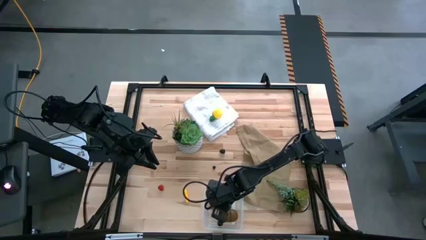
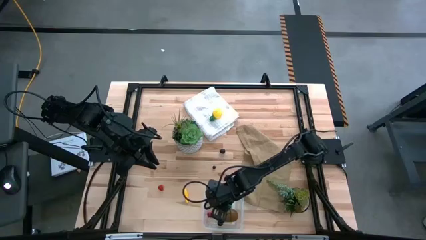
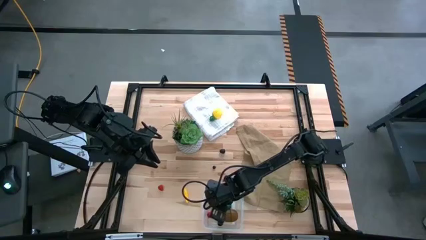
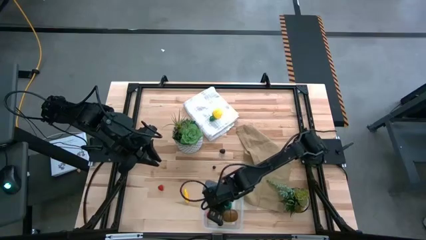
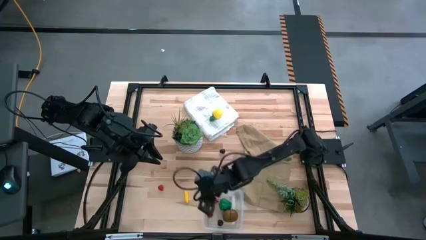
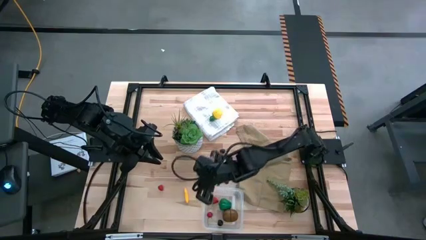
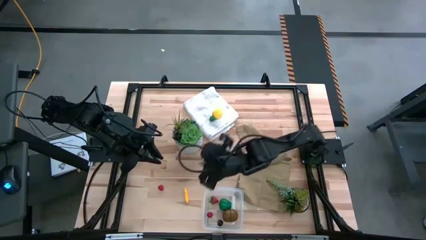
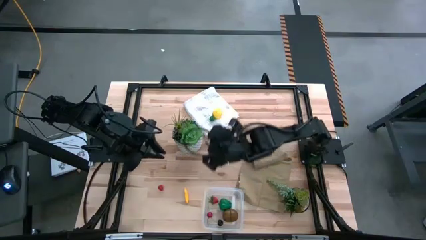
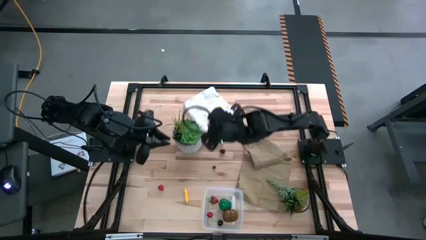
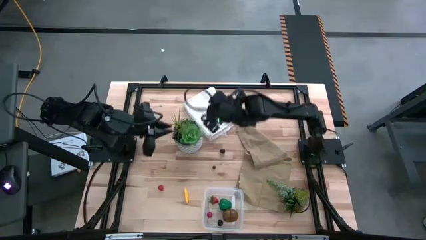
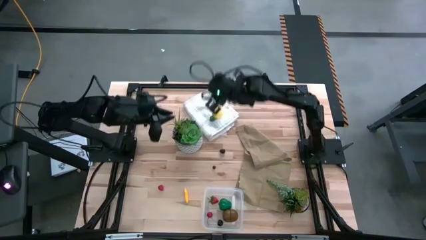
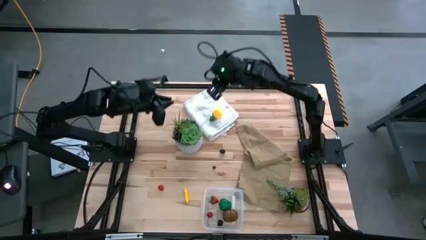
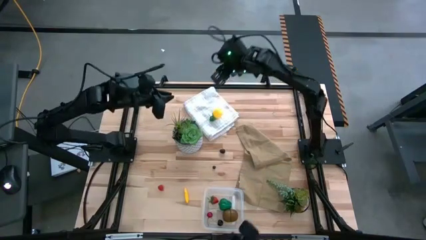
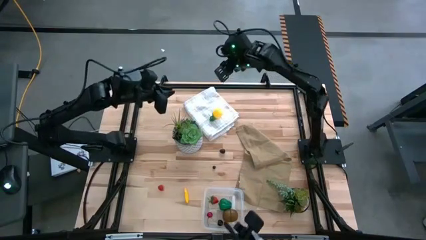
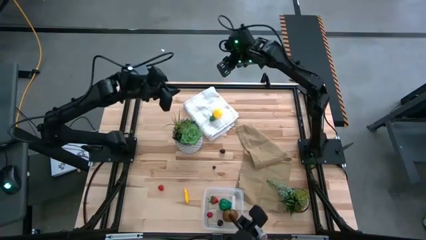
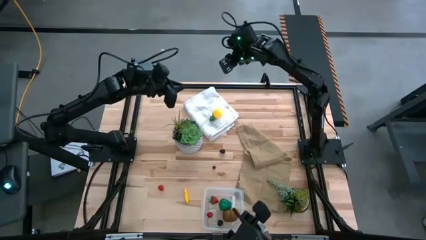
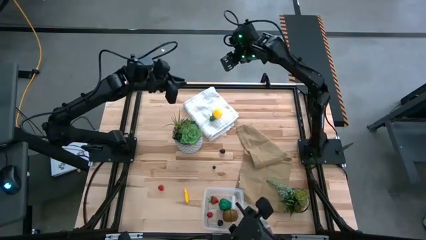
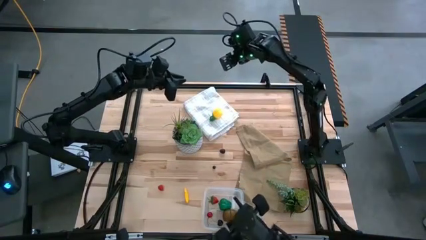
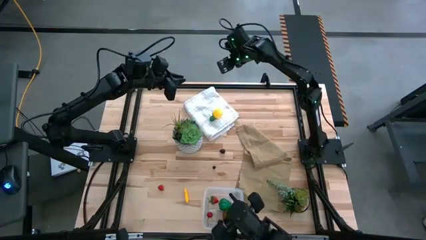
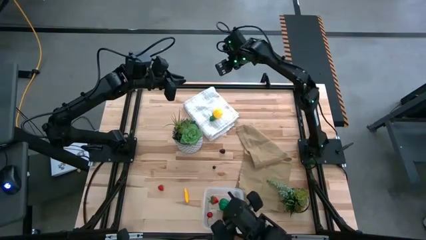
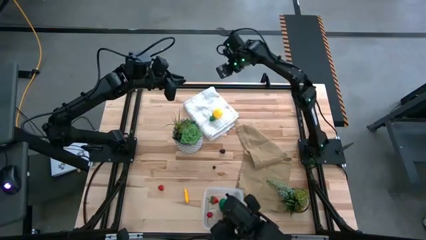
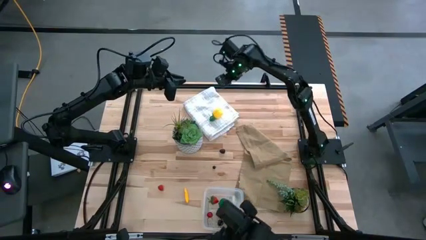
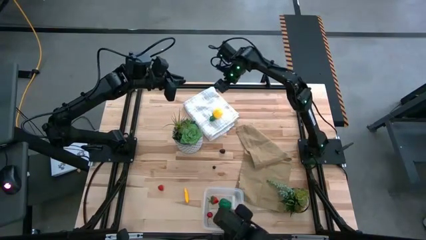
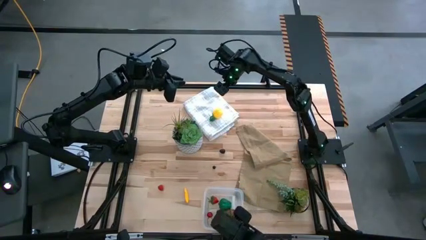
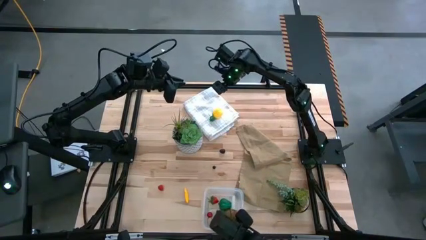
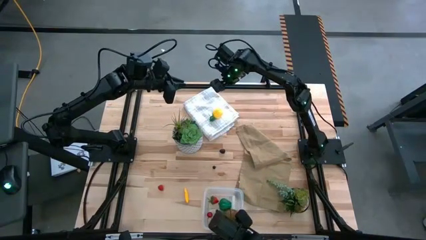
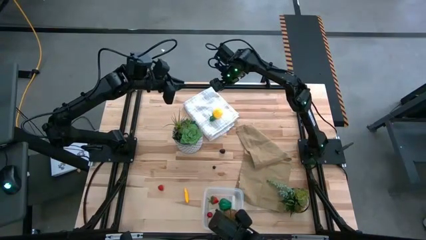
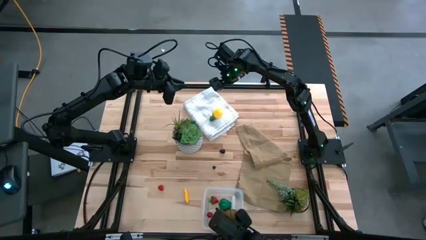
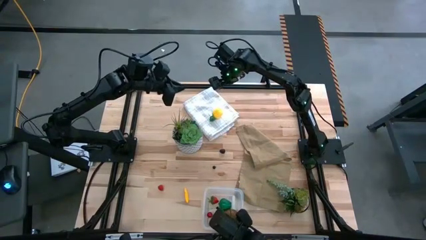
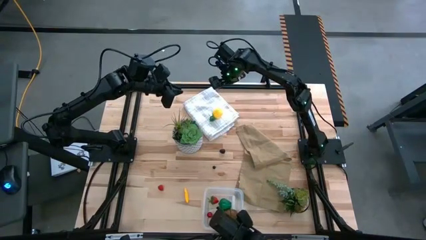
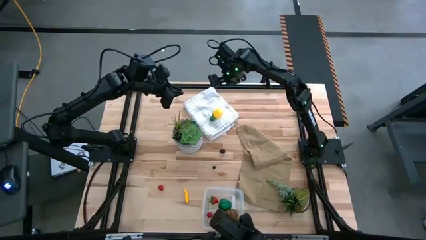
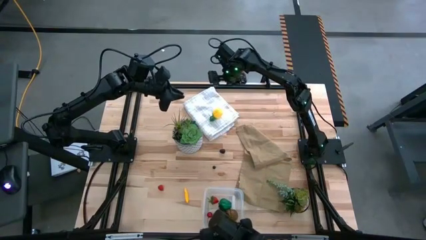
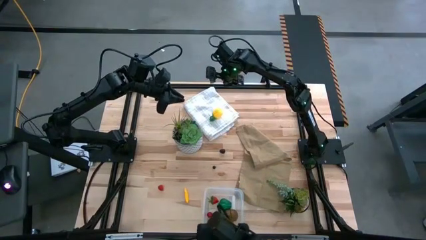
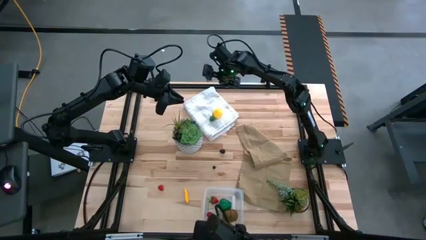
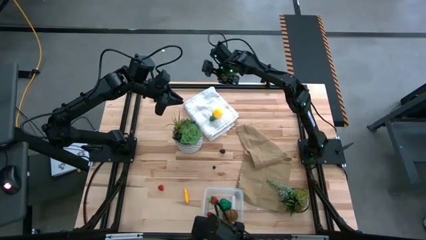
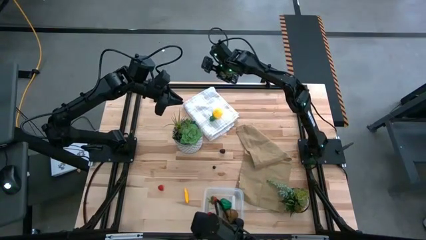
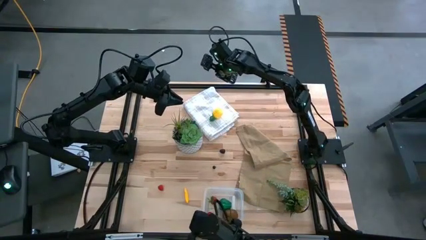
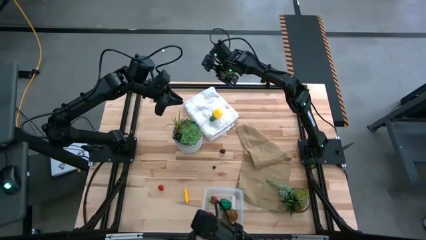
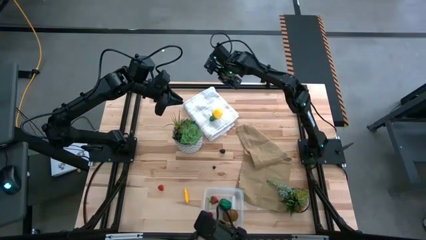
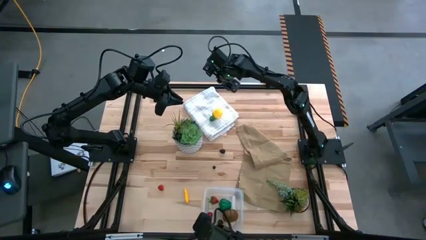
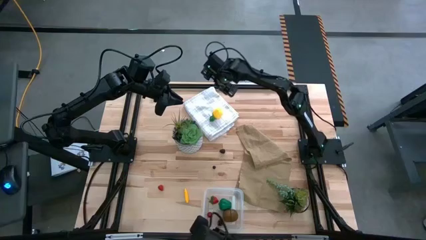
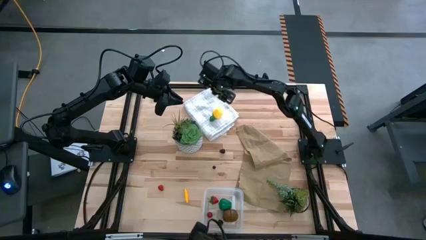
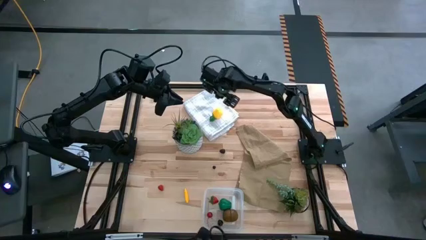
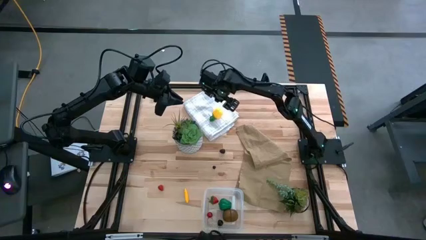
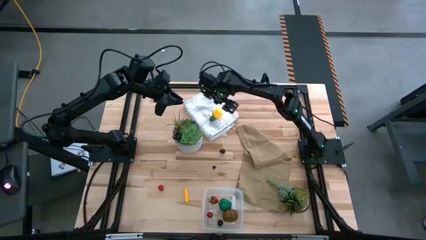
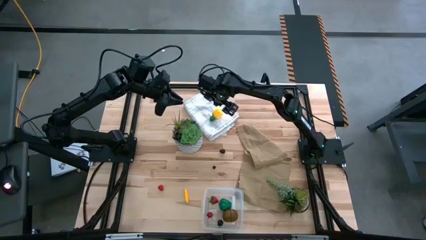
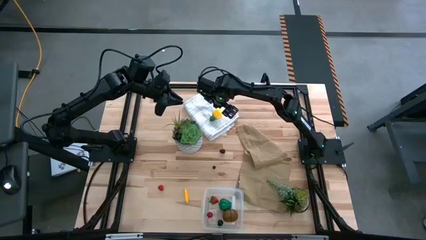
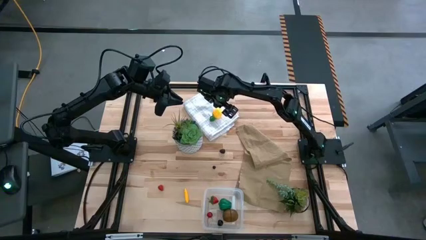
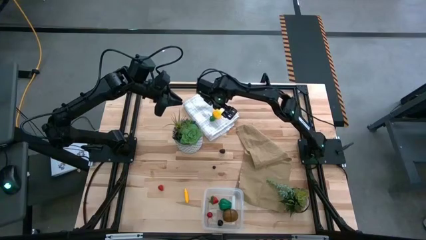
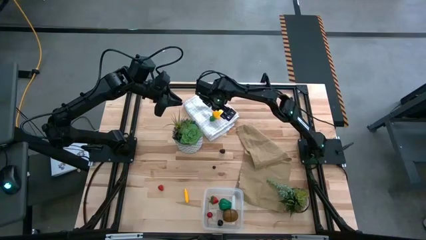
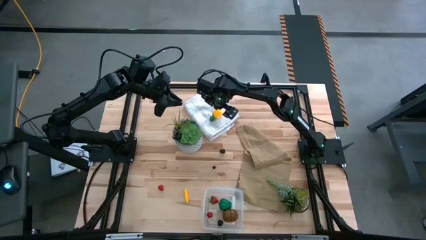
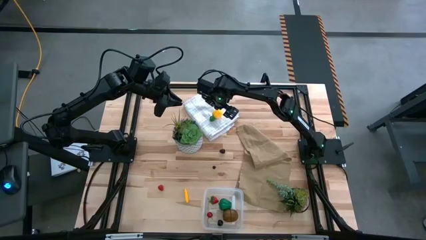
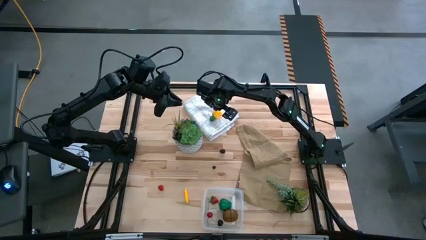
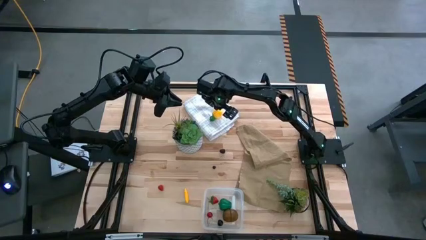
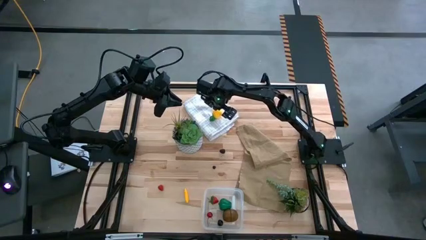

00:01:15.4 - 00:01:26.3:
Task: Pick and placing Produce into tupperware
Put the yellow pineapple into the transparent bin

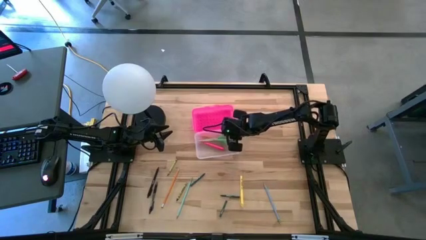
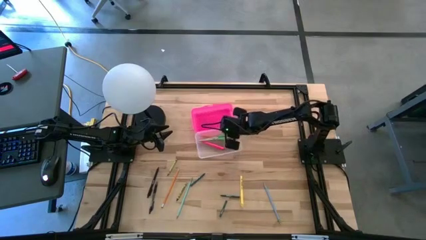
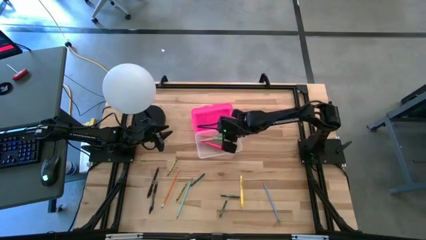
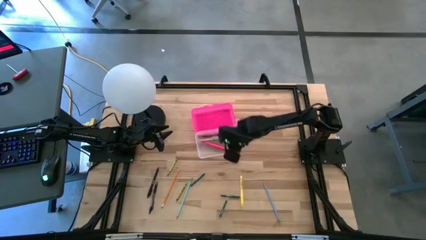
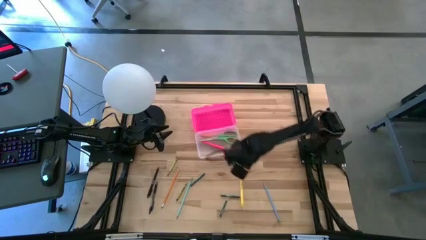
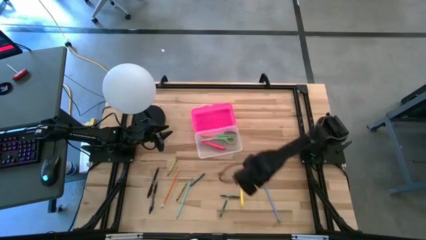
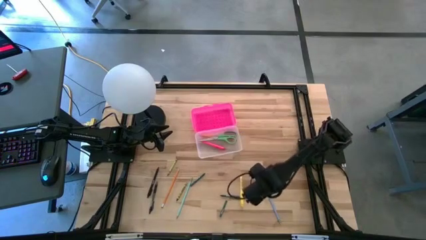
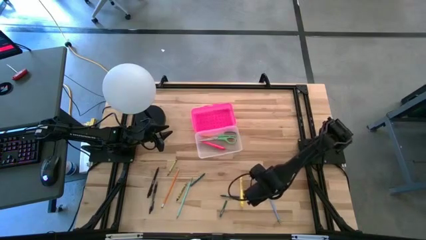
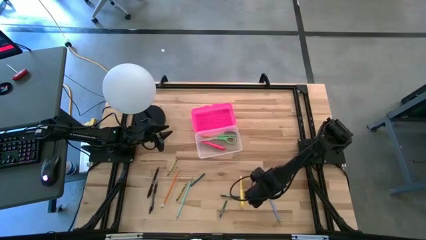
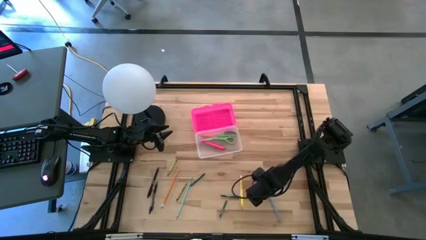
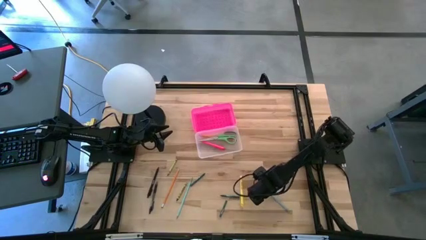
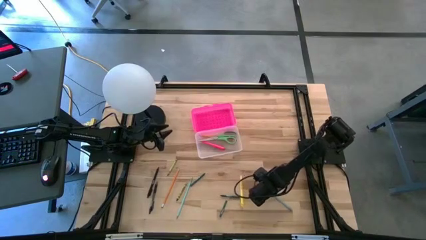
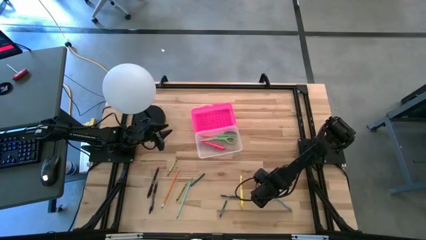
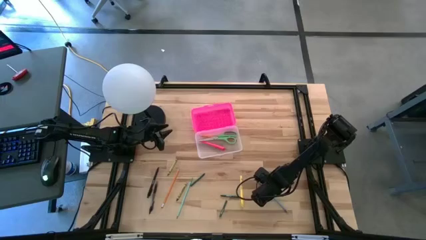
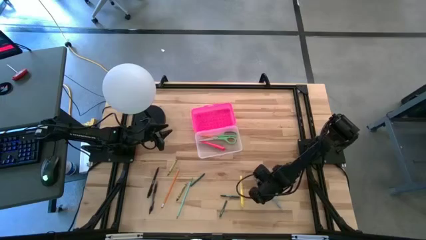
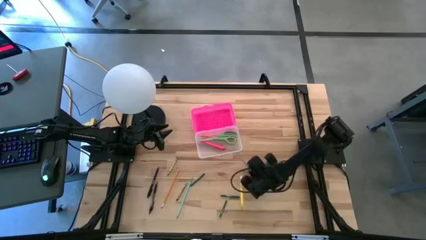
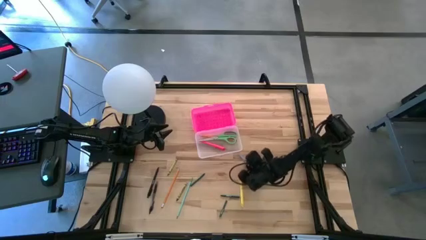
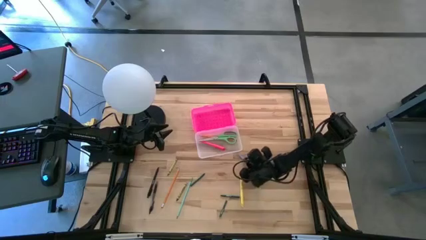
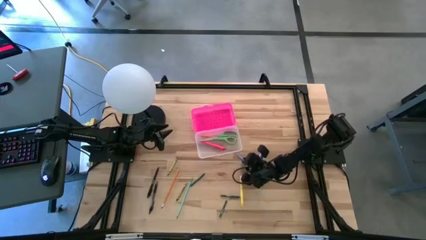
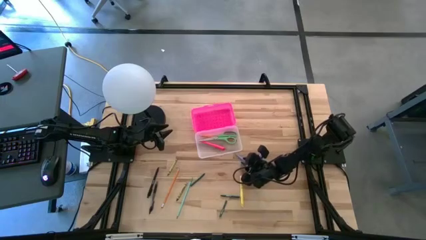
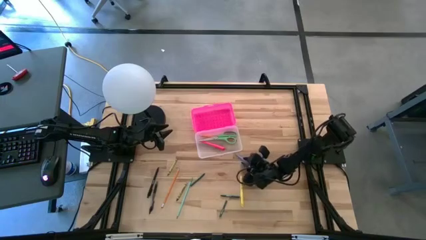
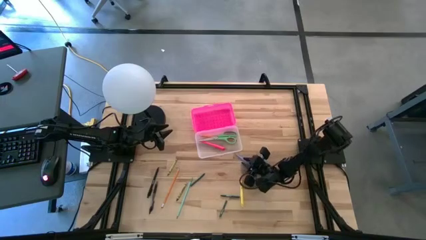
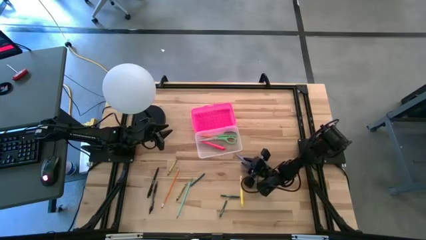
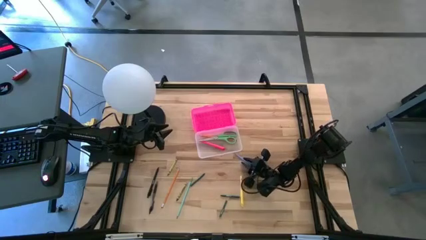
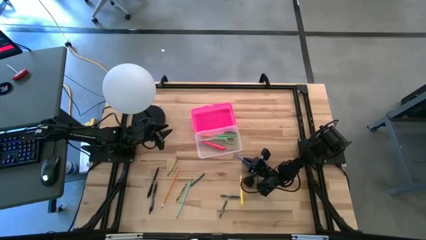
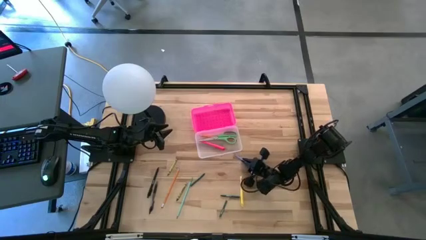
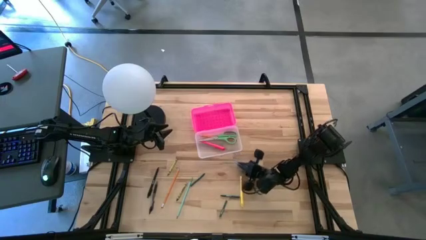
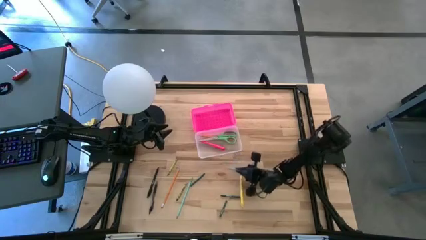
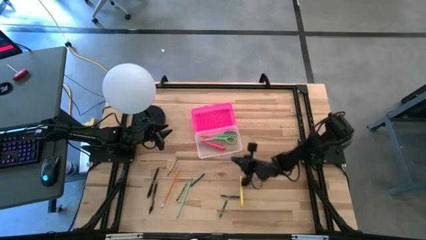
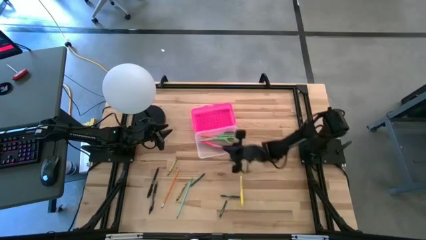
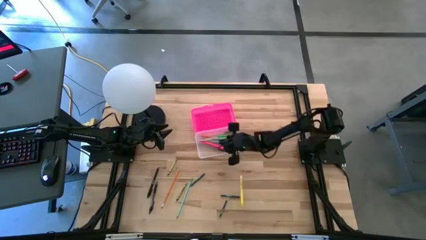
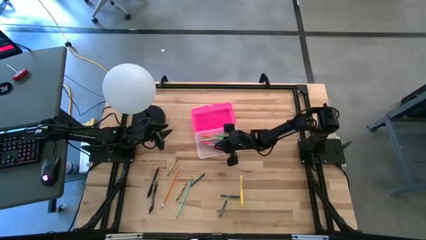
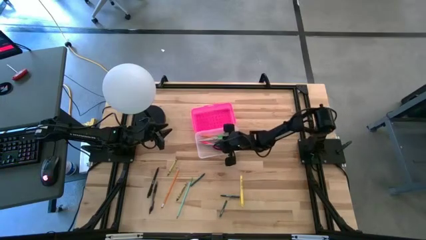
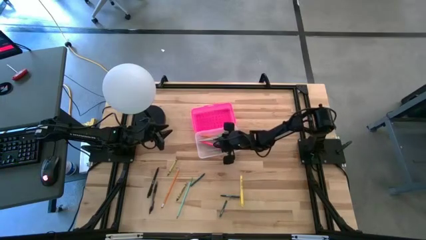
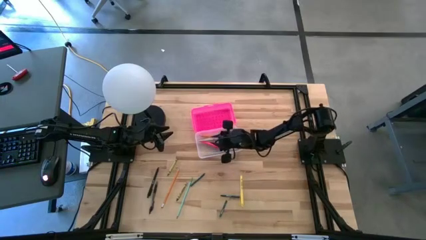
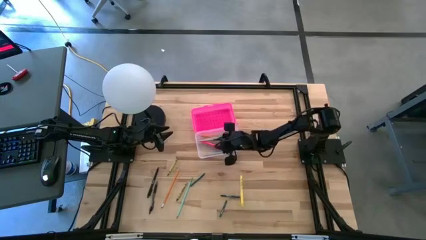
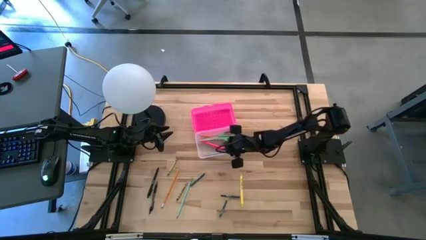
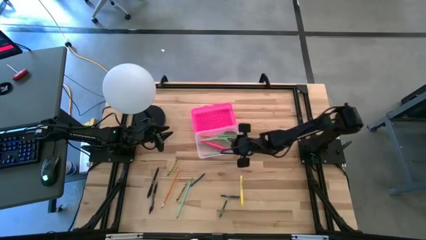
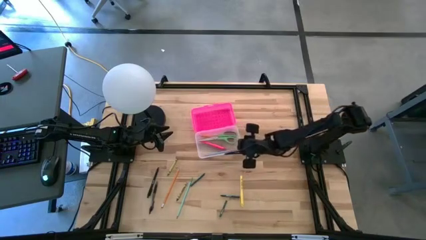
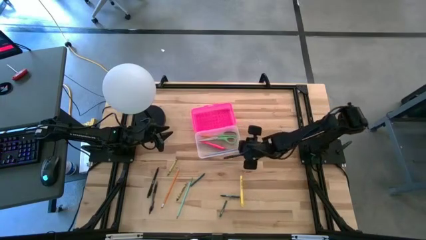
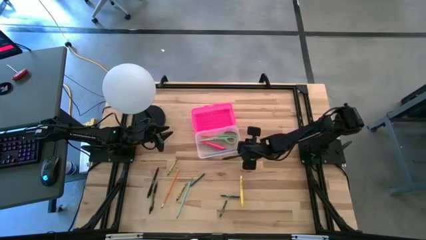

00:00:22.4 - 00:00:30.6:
Task: Pick & place school supplies into a supply box
Put the right blue pencil into the pink supply box
